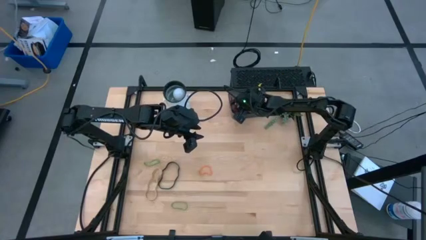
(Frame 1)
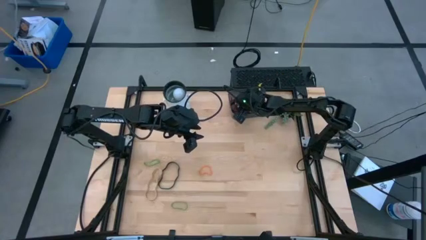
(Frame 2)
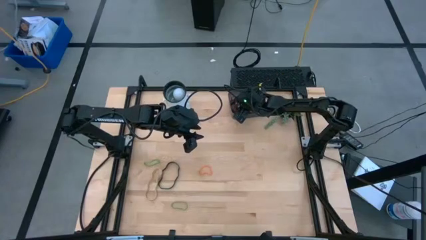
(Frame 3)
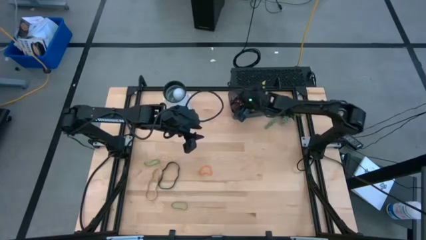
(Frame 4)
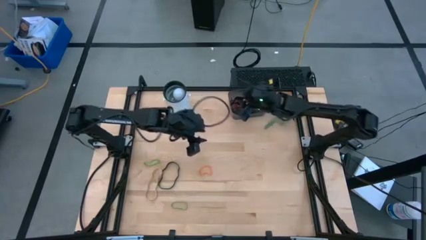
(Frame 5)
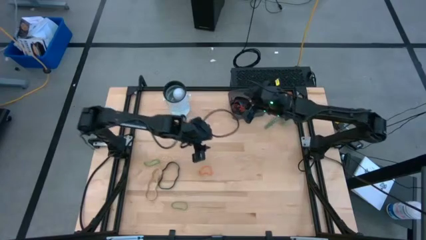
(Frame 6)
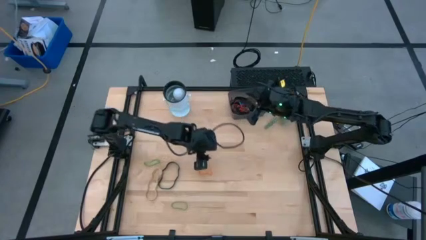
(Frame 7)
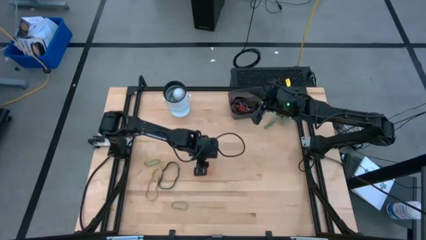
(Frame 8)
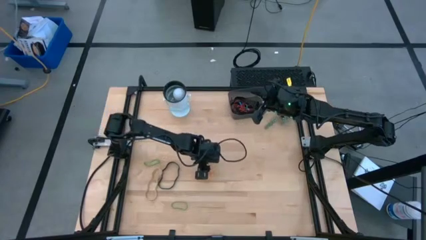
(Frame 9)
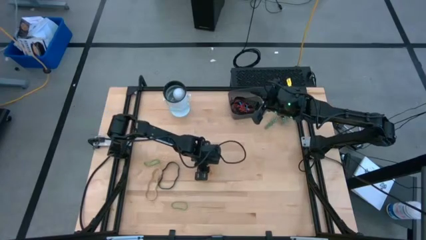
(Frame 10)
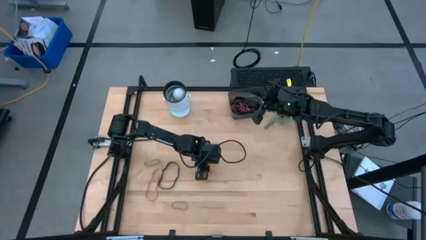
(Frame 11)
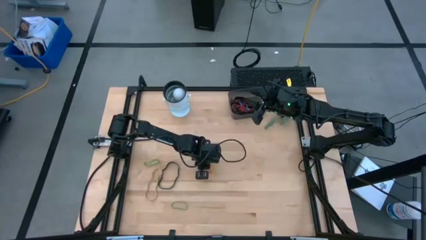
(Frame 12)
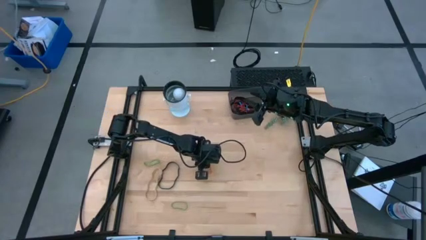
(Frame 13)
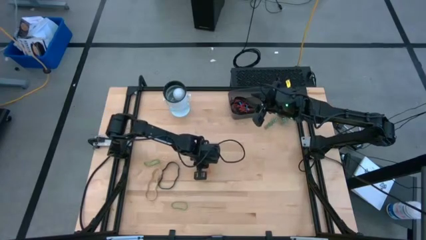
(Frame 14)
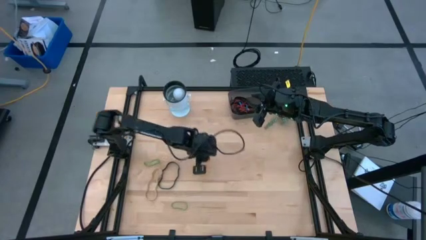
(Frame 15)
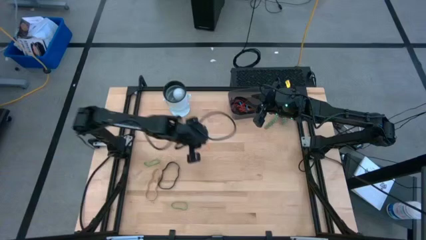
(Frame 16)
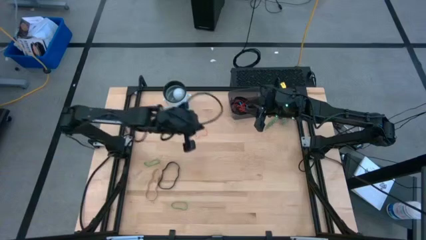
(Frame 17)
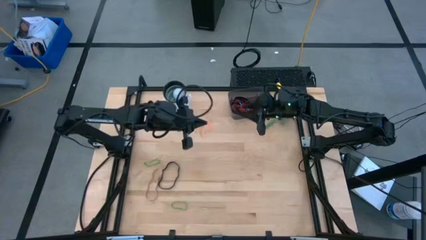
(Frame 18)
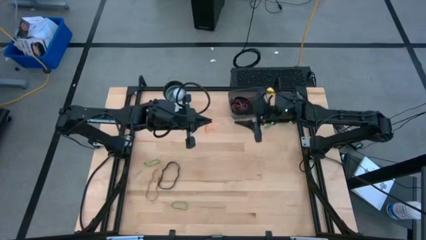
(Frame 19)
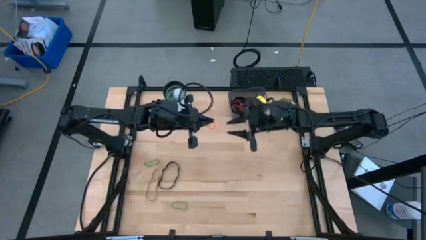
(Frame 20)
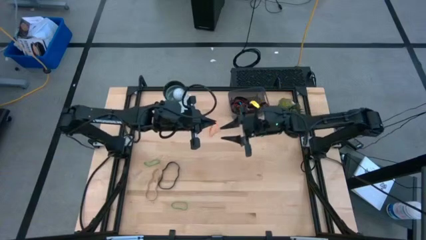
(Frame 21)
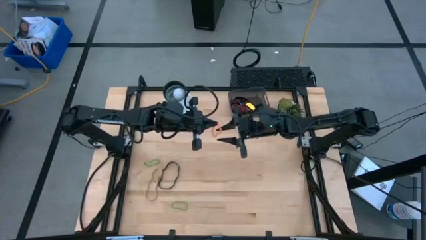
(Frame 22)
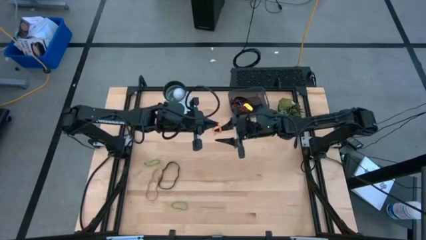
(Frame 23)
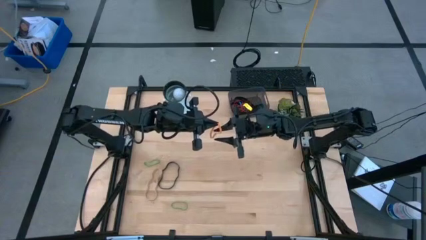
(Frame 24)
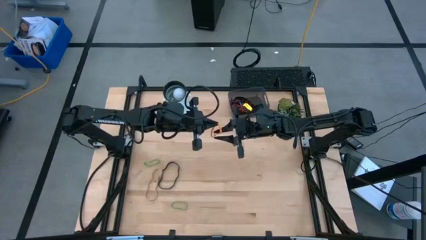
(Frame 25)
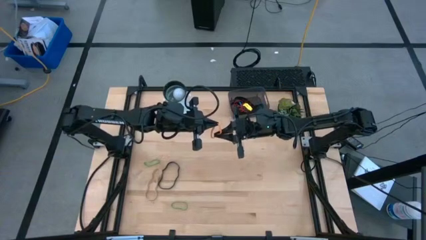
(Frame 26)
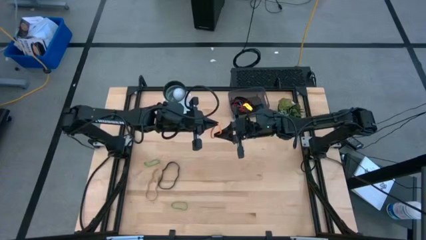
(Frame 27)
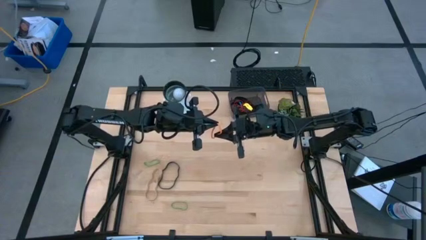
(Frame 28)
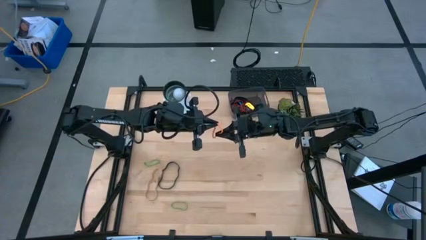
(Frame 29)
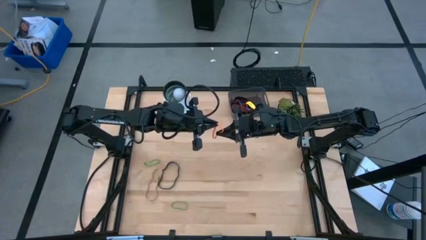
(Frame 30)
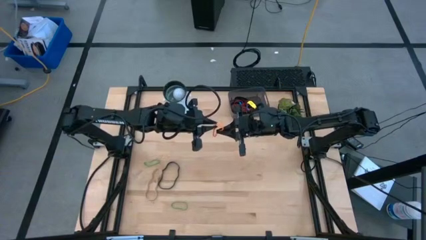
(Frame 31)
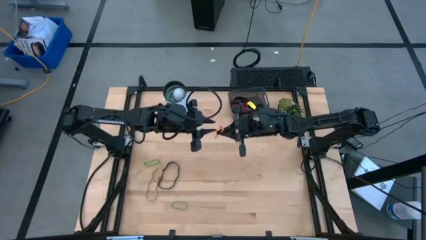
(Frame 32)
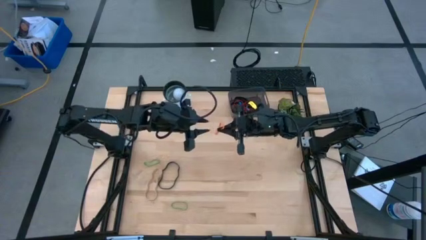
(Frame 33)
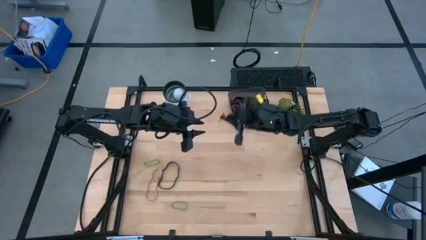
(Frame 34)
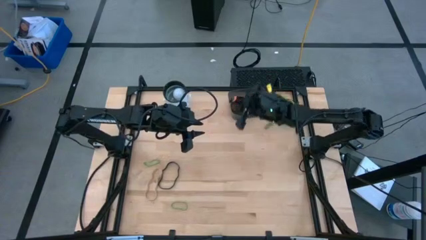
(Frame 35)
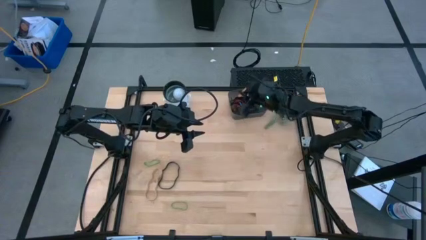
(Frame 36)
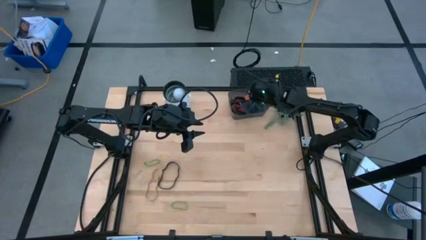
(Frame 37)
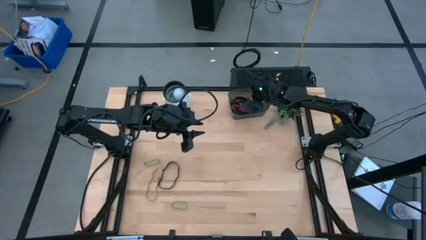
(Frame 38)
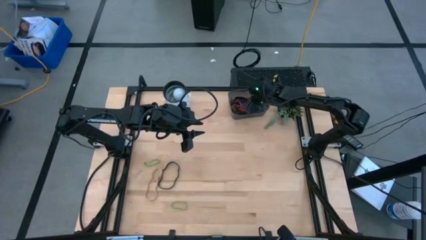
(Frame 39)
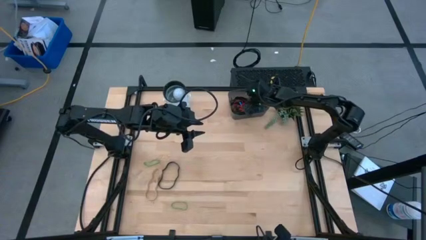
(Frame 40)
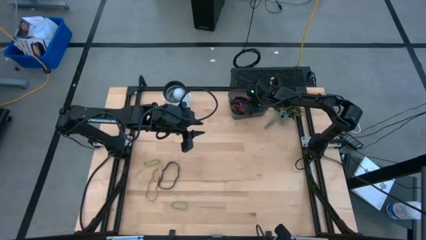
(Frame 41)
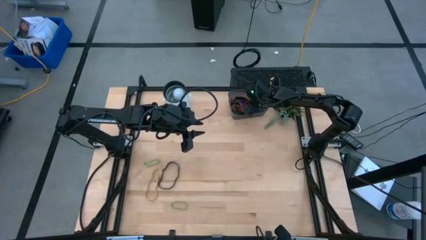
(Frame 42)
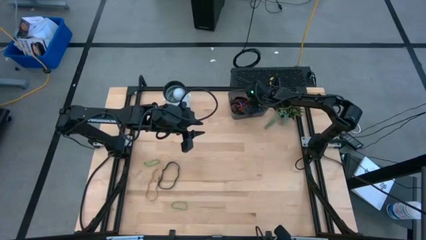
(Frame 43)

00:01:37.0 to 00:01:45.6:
Task: Pick and place rubber bands into bin
Put the orange rubber band into the black bin

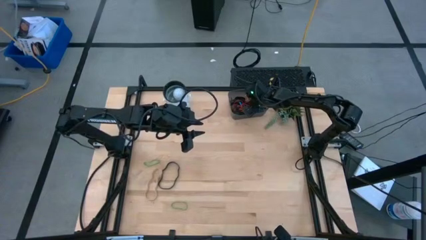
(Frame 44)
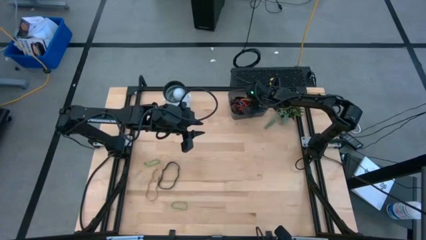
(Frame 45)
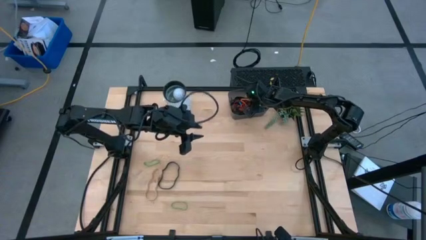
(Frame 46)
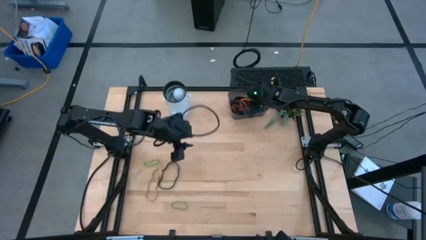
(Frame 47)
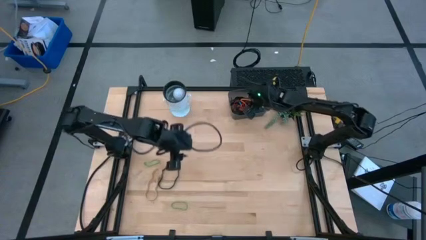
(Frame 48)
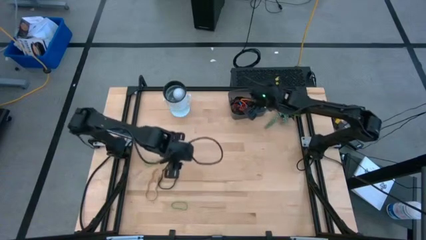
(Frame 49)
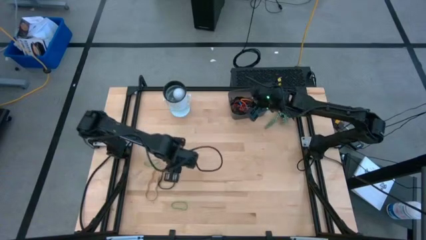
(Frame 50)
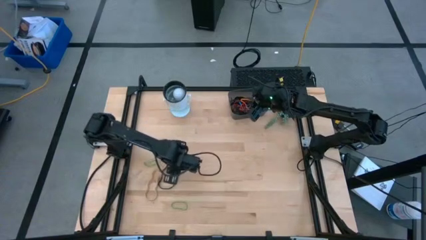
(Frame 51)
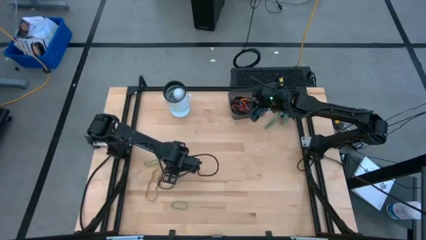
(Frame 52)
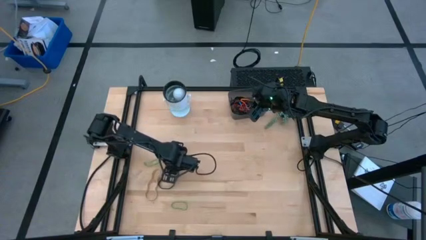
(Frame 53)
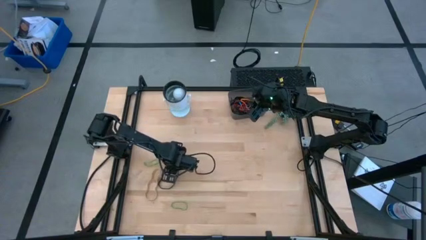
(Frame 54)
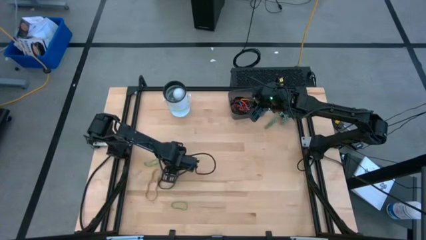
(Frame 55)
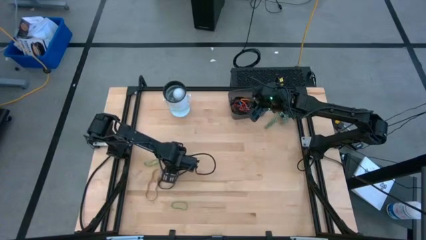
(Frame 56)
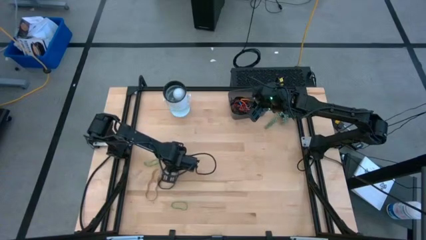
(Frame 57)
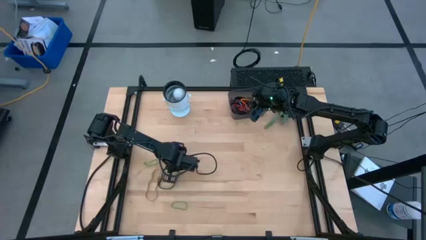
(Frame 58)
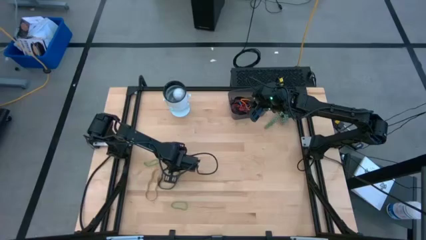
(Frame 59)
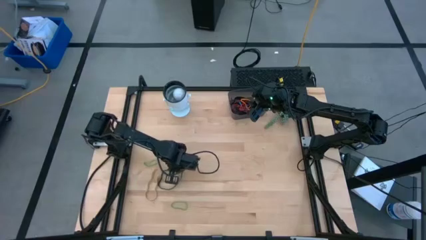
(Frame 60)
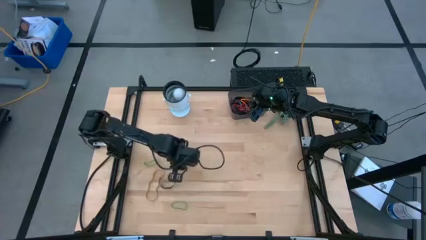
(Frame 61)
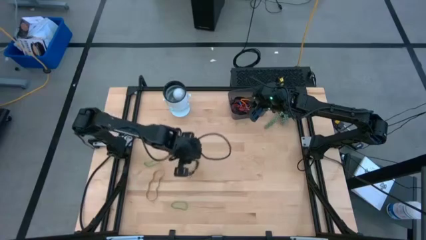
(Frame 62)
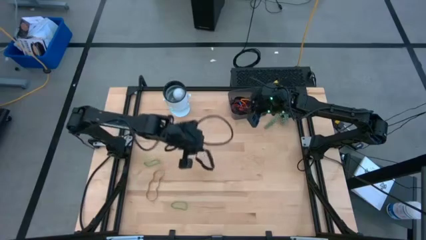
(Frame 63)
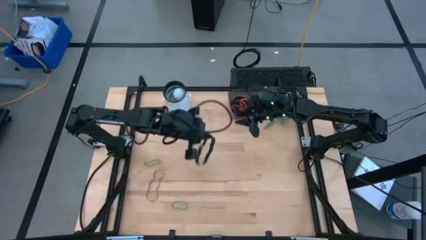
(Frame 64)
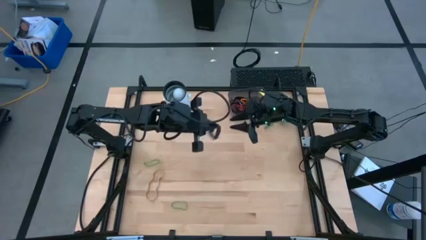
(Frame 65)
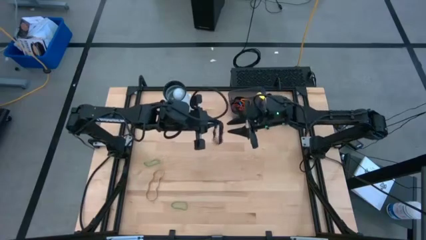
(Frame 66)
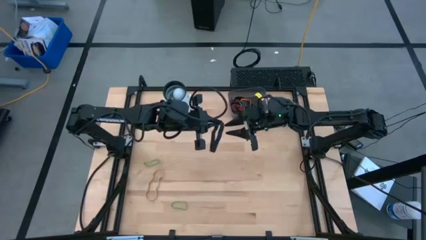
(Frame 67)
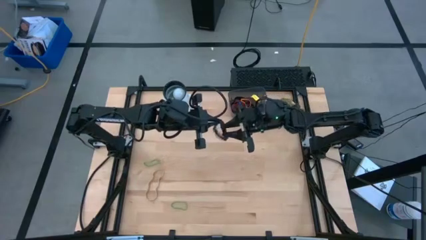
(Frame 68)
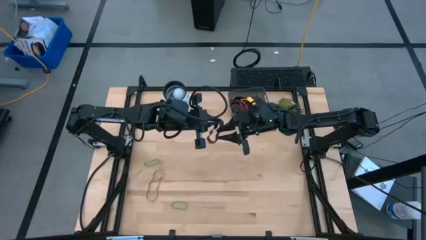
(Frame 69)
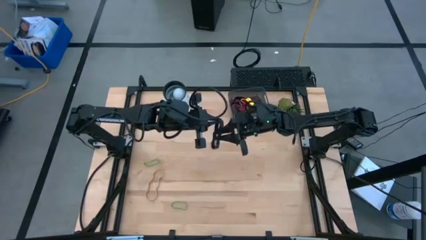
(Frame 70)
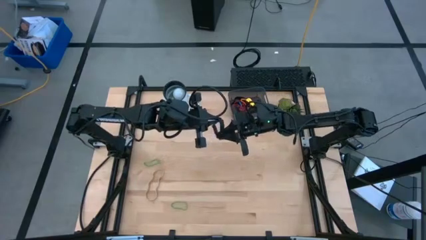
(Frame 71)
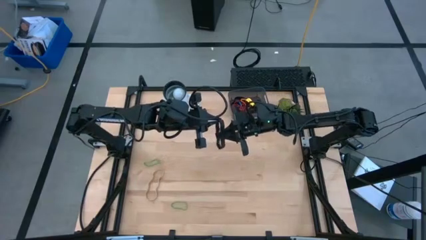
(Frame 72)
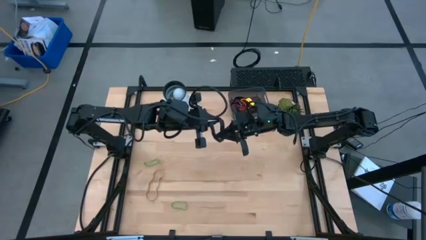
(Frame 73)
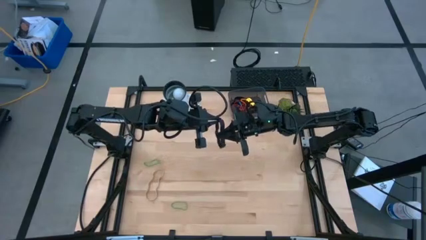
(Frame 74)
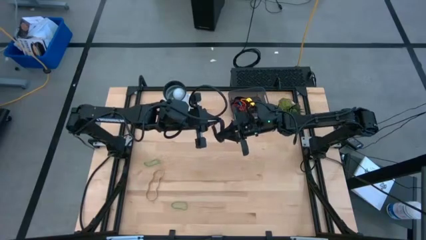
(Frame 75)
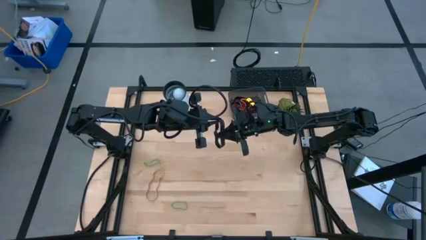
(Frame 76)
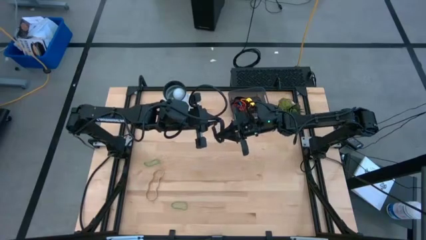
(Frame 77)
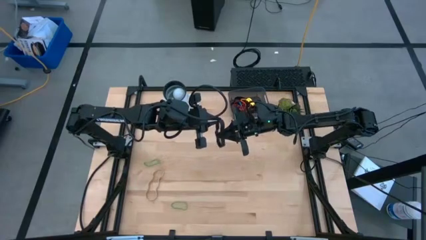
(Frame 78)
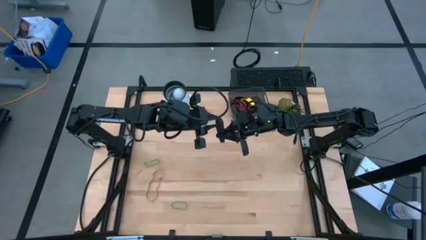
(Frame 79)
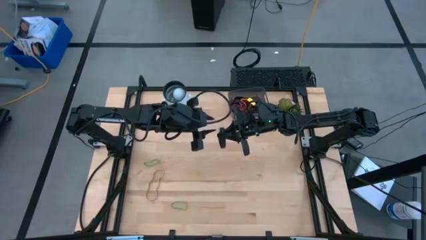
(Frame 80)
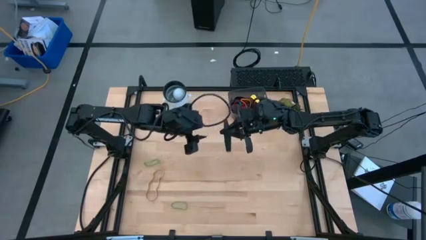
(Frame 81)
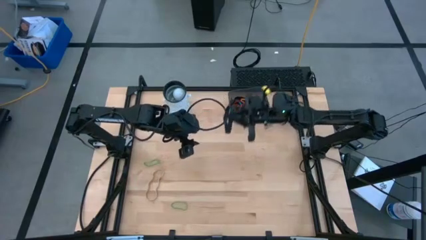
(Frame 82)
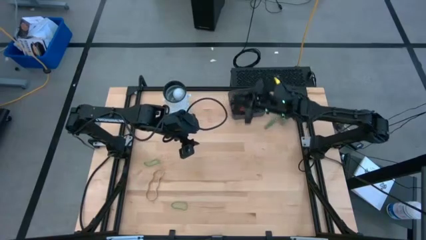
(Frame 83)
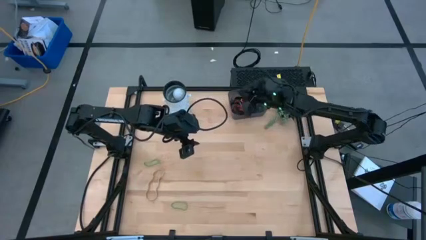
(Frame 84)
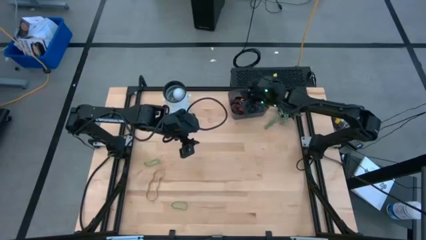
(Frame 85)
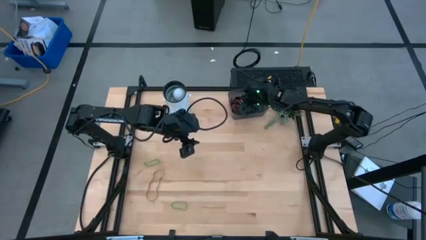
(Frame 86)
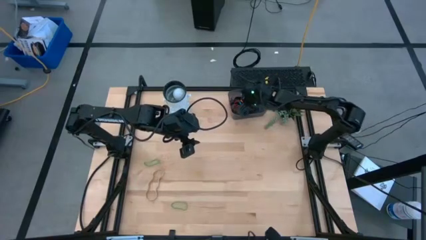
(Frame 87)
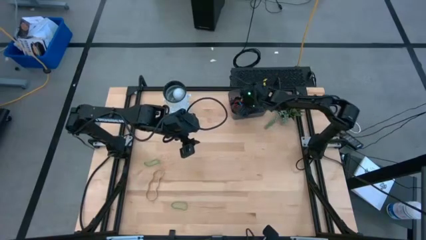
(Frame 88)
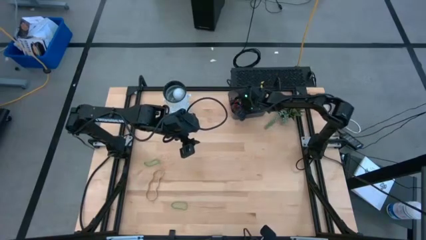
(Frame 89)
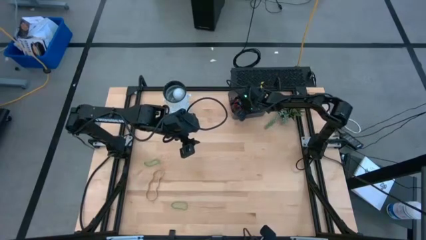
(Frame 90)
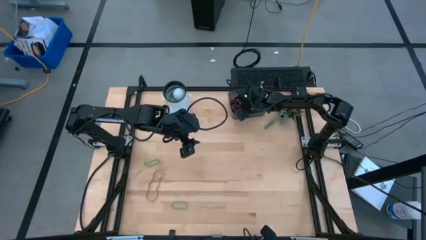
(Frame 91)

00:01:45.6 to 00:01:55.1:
Put the black rubber band into the black bin
